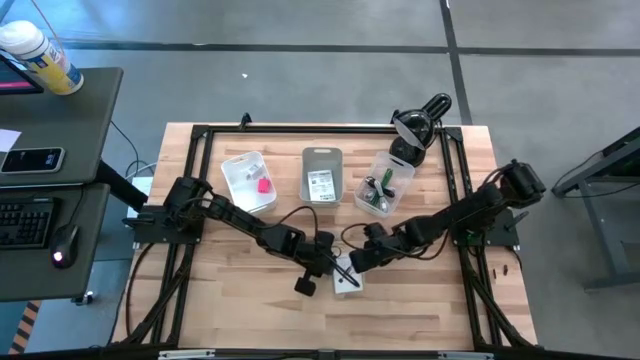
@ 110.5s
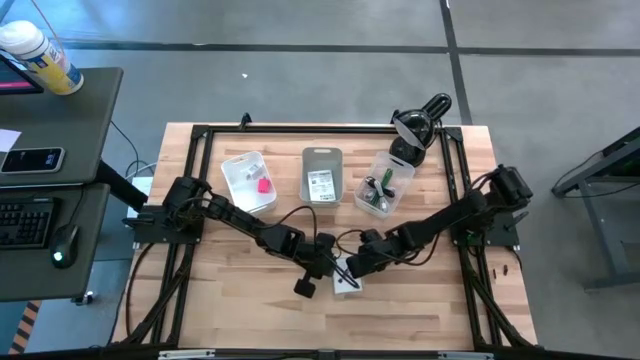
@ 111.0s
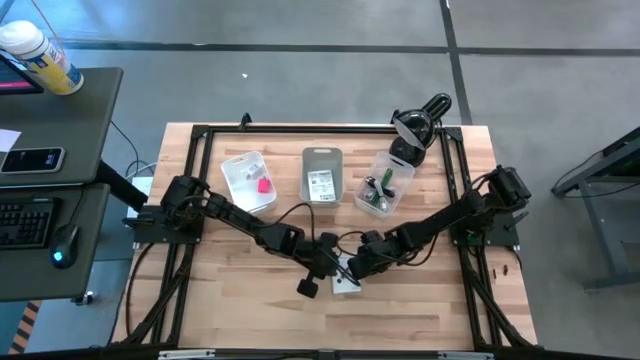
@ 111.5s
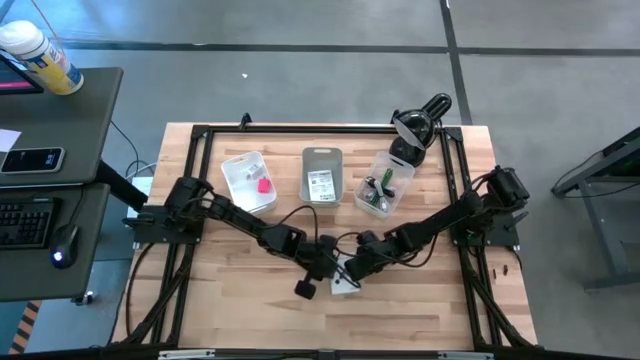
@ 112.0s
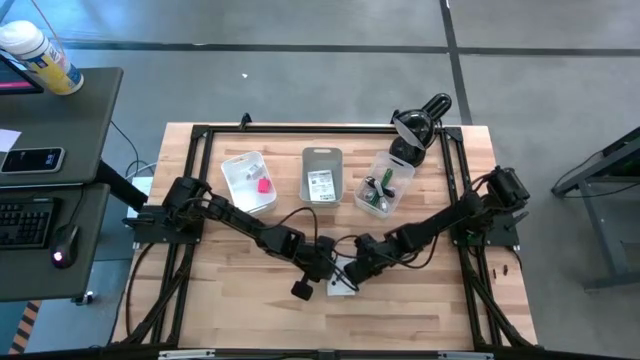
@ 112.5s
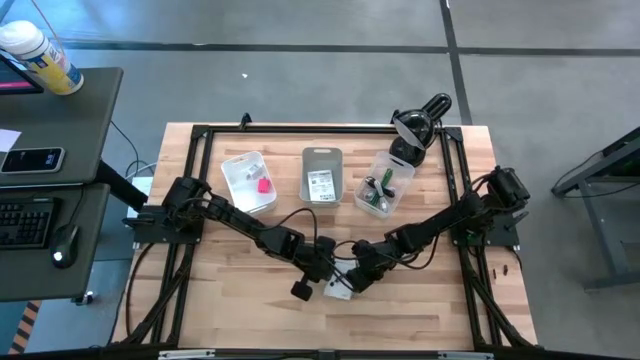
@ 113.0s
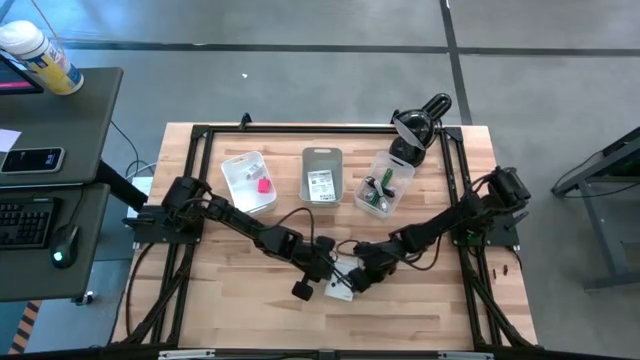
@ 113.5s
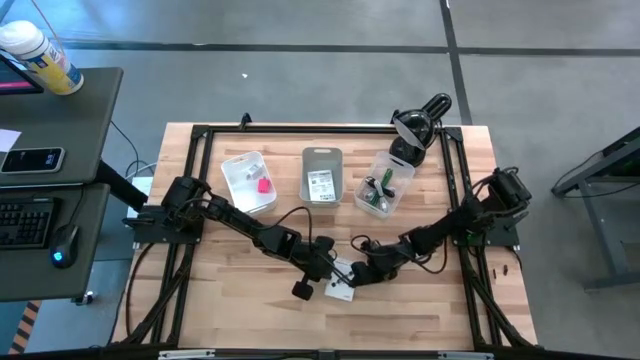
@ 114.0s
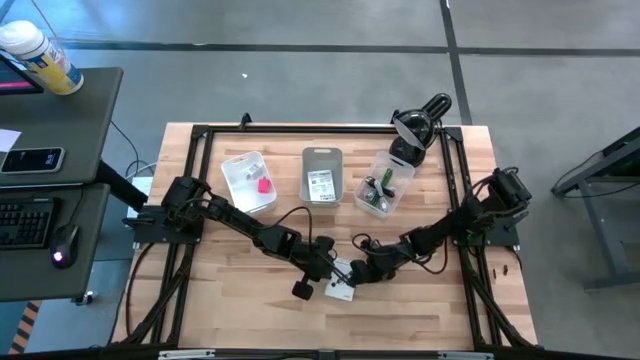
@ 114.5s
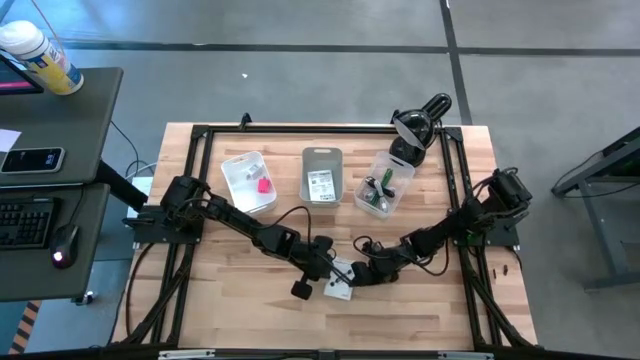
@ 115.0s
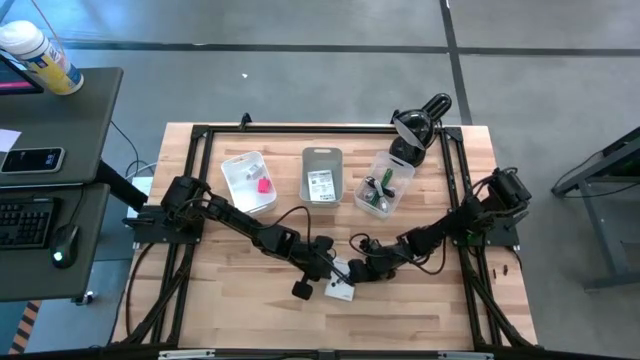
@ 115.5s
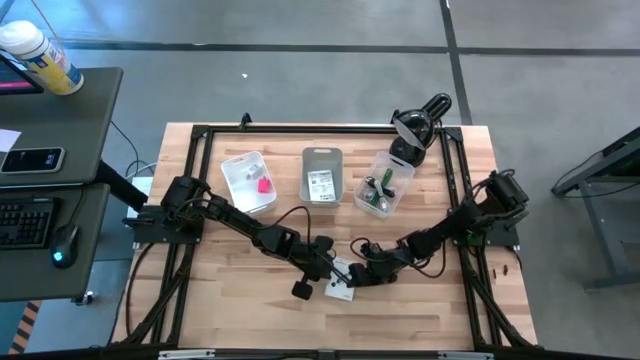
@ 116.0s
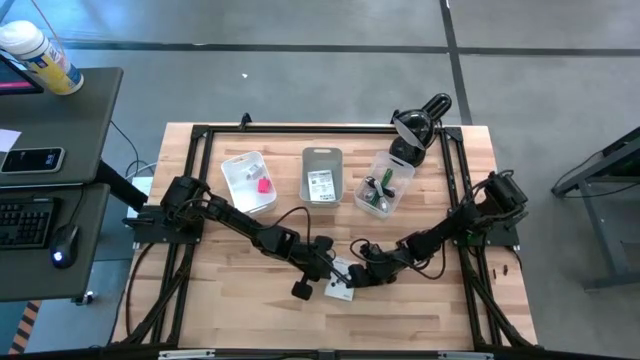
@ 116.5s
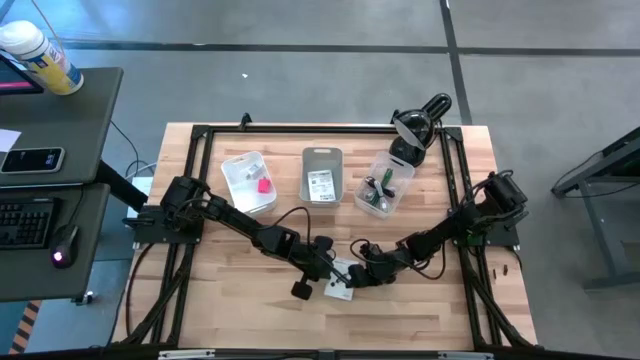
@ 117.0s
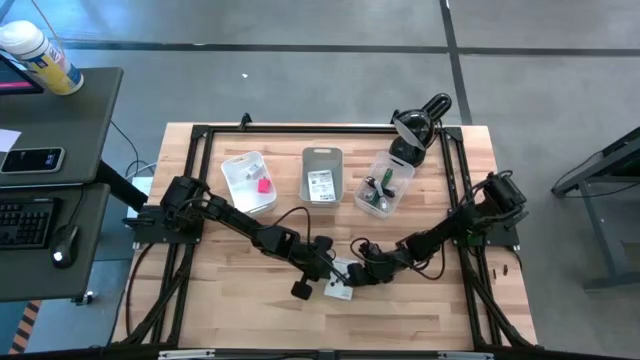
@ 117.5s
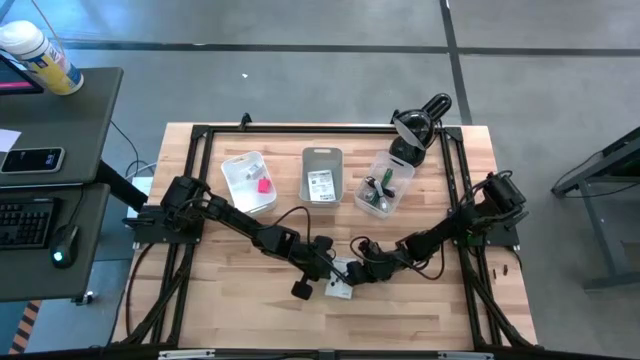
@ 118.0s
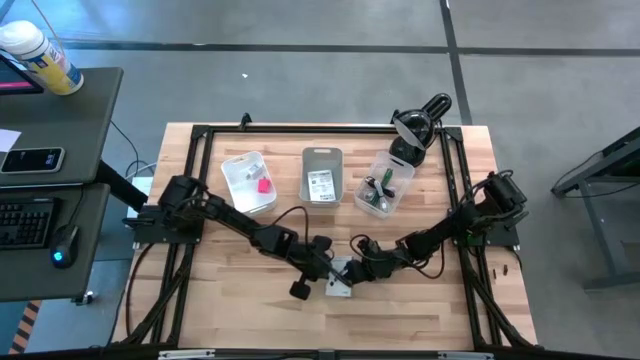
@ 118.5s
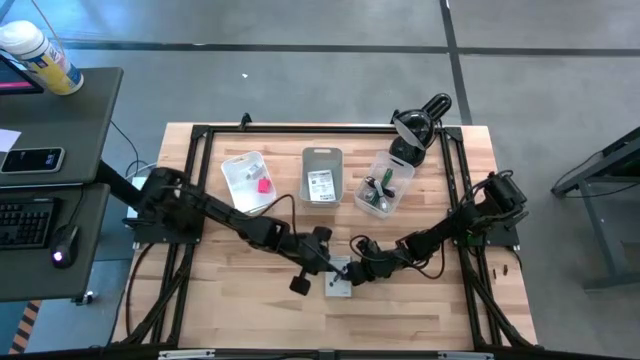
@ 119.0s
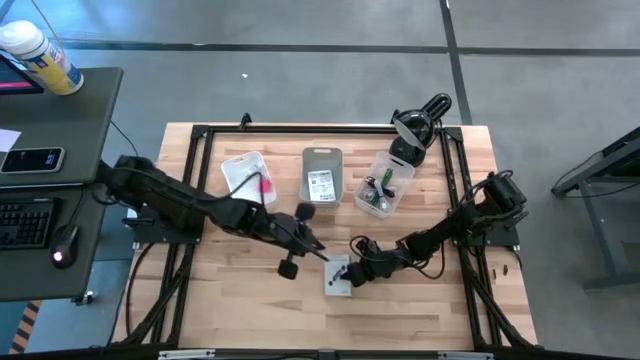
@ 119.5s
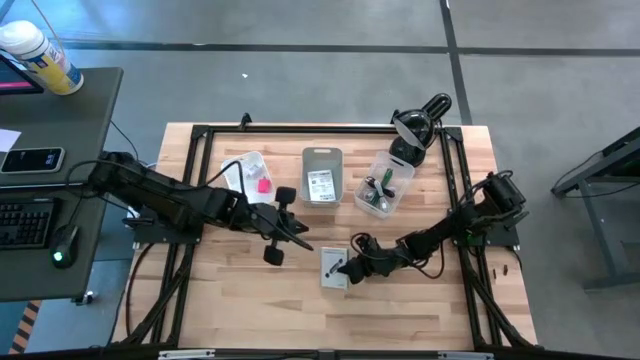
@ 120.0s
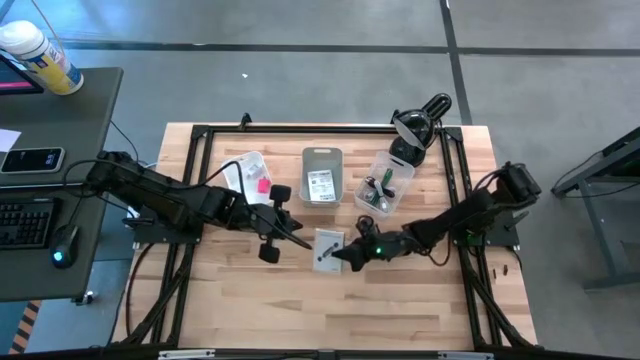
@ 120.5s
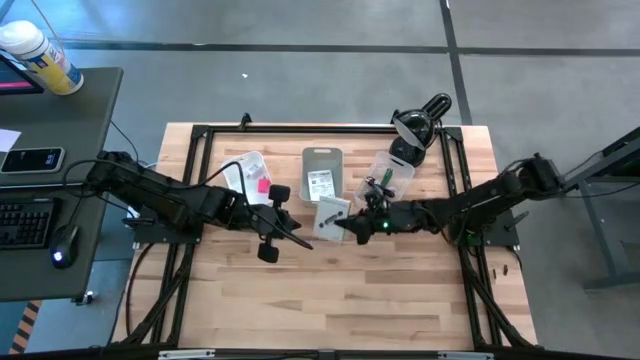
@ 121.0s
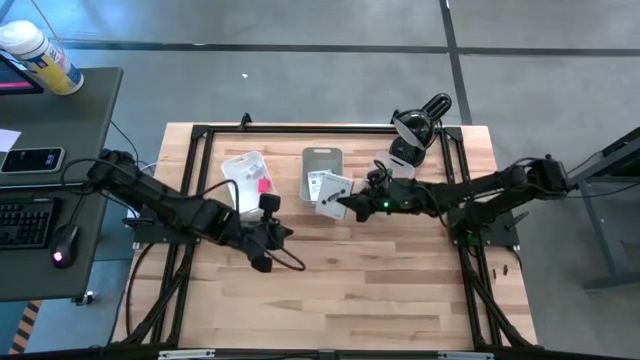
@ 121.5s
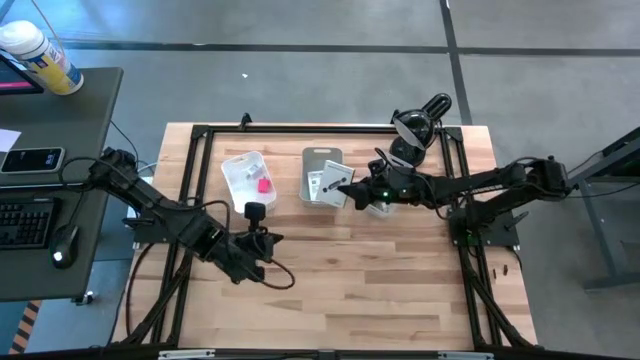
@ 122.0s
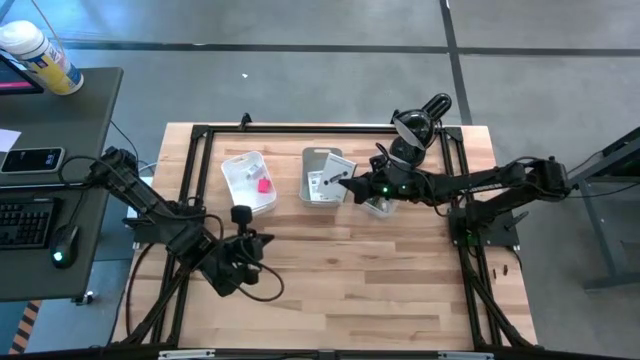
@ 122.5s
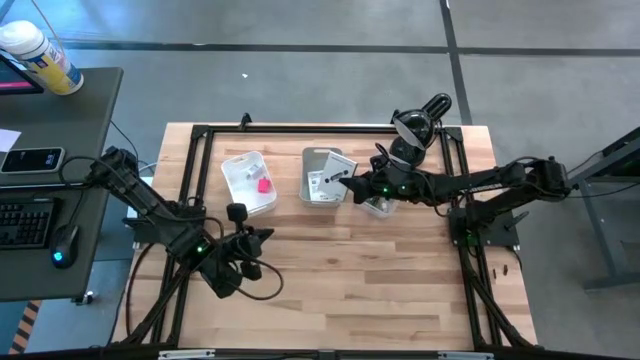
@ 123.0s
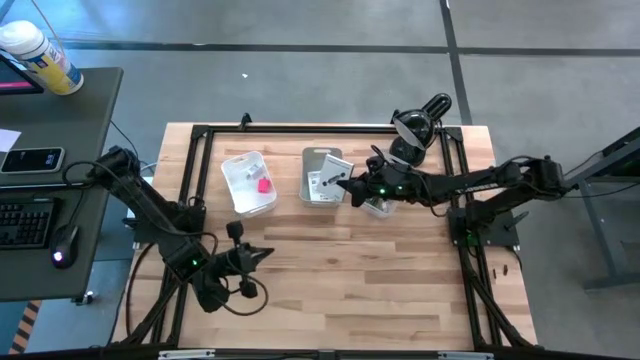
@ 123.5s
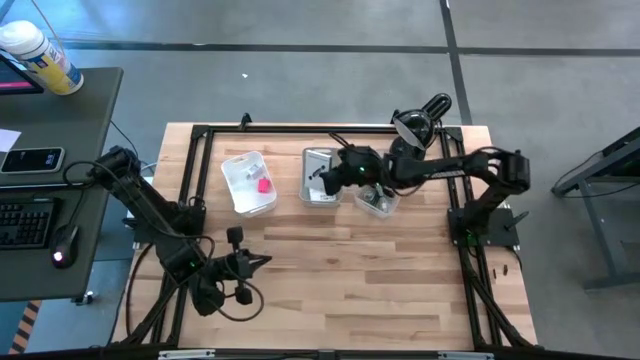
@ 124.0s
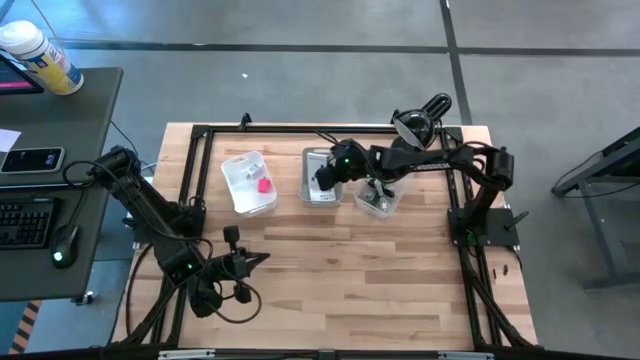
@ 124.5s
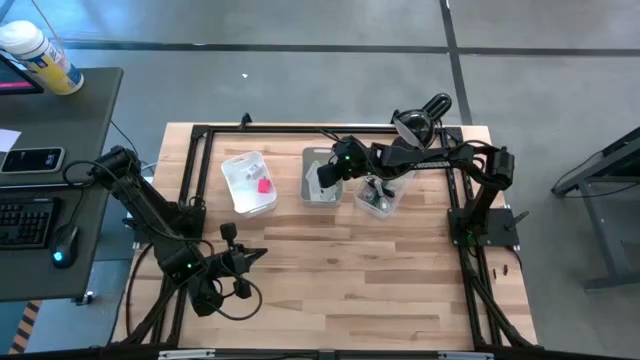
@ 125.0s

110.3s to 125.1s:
Task: Pick and place items into bin
Put the white card reader box into the gray bin

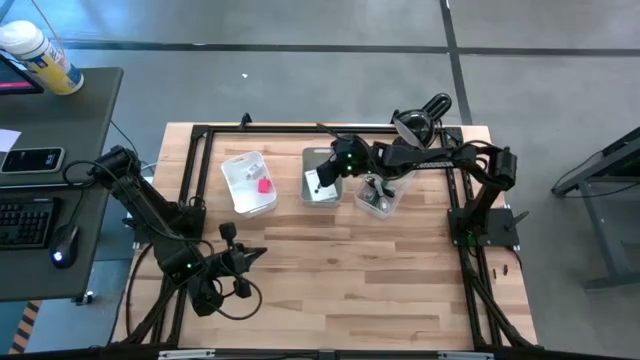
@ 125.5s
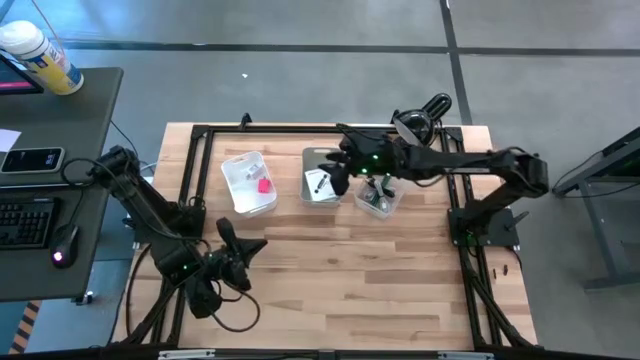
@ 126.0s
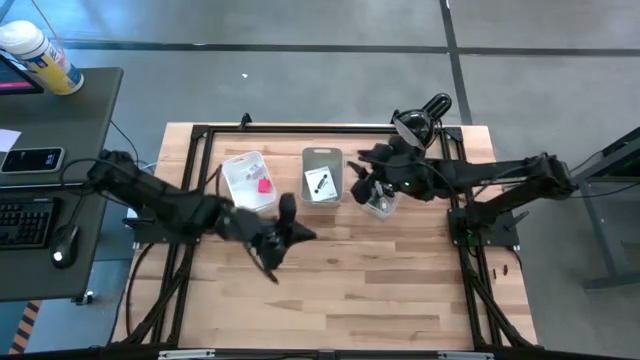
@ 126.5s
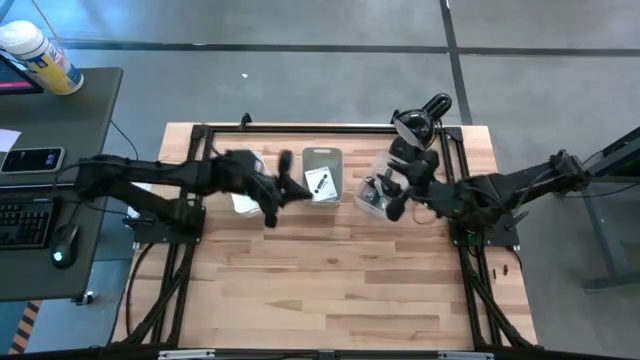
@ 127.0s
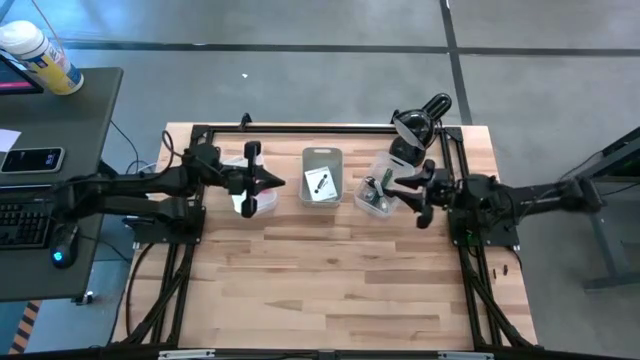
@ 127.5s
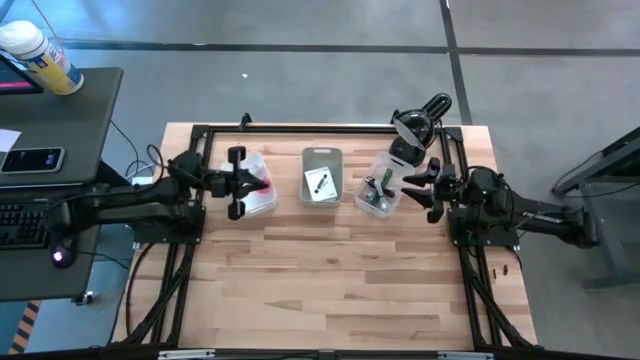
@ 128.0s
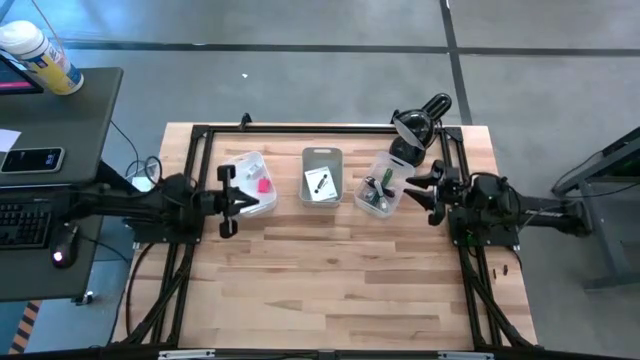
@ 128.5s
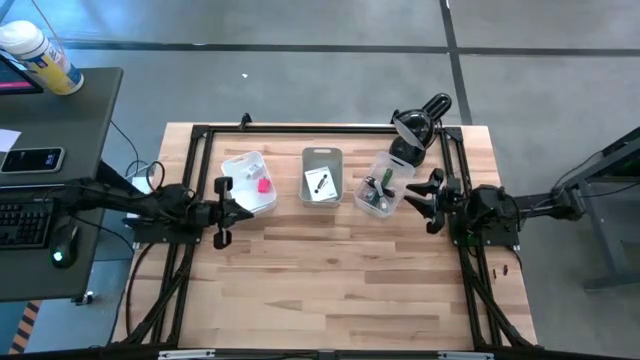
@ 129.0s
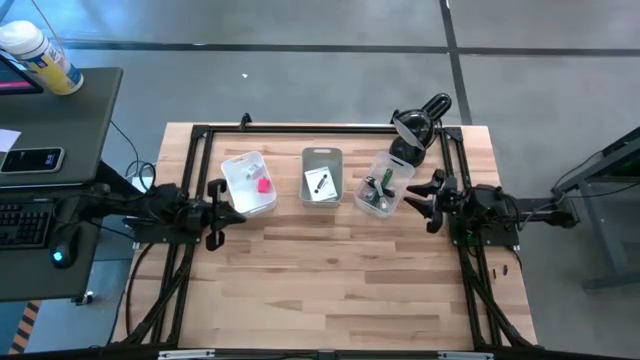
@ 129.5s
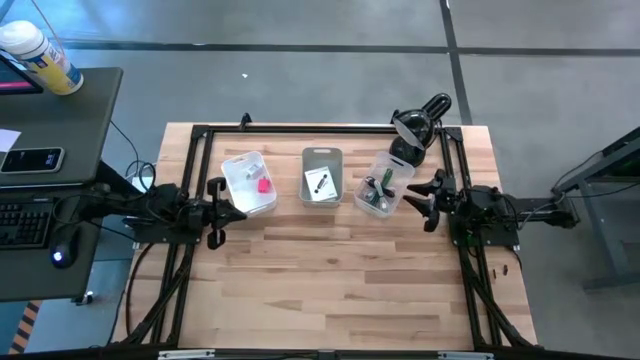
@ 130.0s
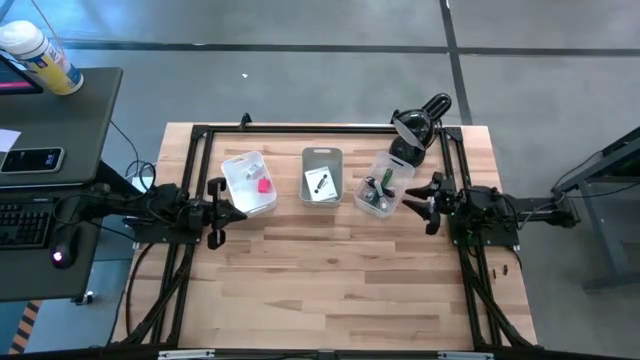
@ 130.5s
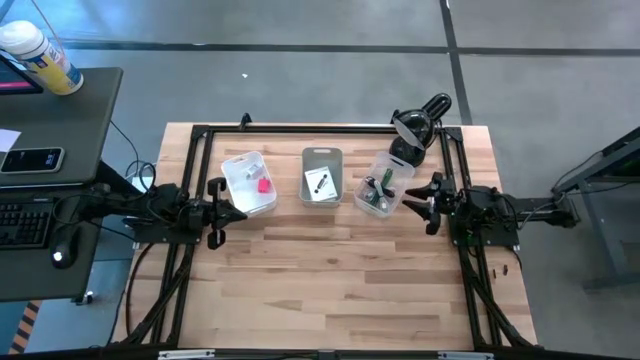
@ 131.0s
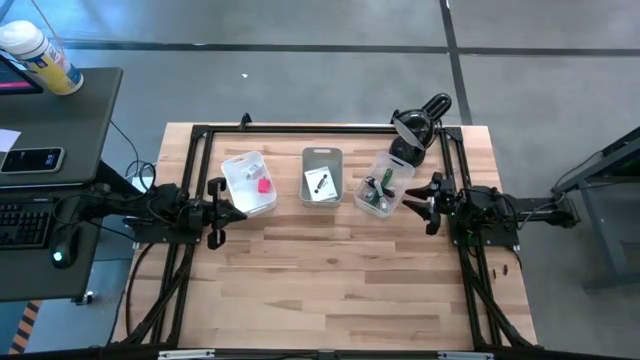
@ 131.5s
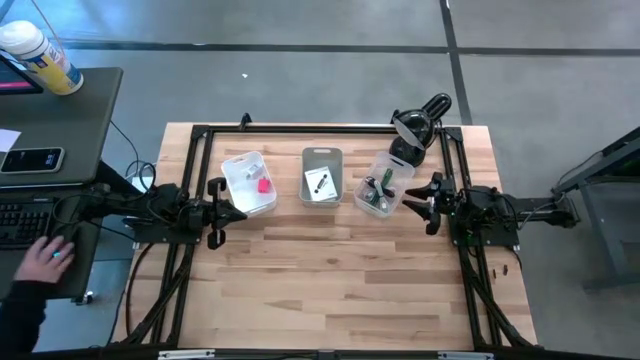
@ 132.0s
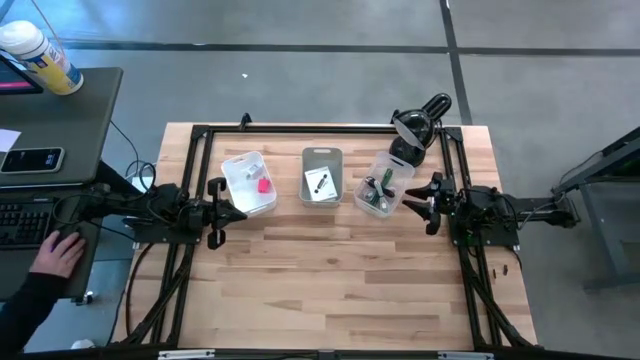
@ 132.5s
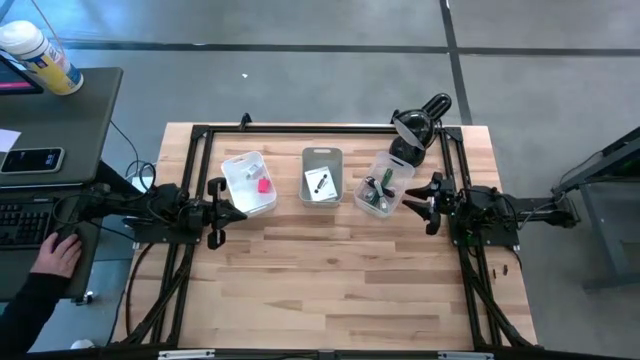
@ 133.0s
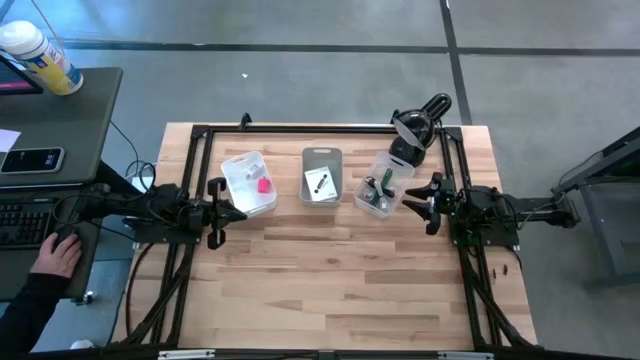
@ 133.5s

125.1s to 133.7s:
Return to Home Position
